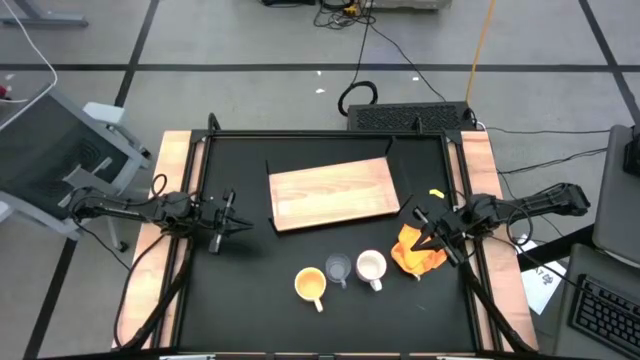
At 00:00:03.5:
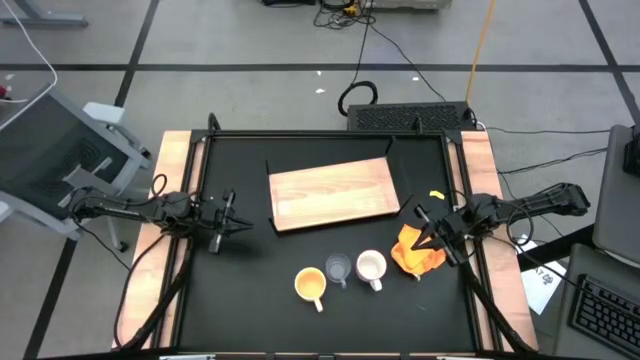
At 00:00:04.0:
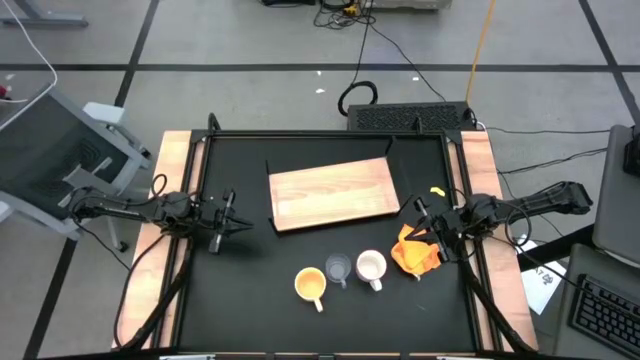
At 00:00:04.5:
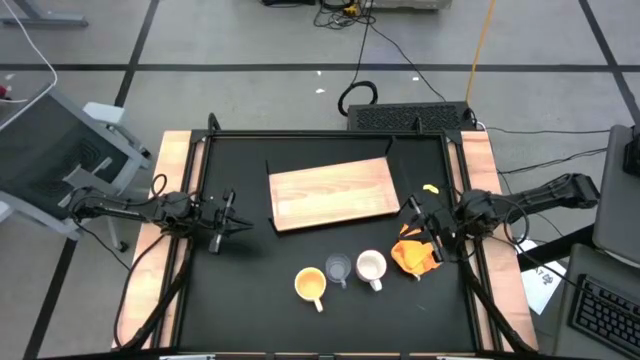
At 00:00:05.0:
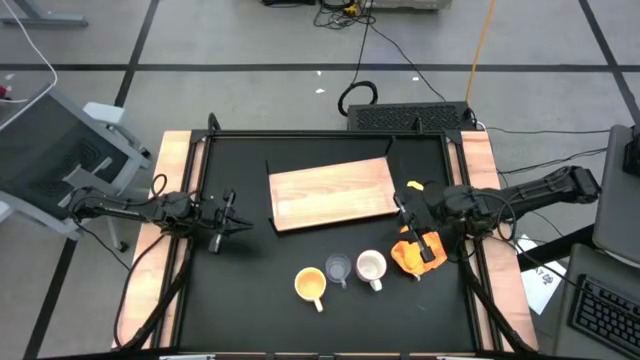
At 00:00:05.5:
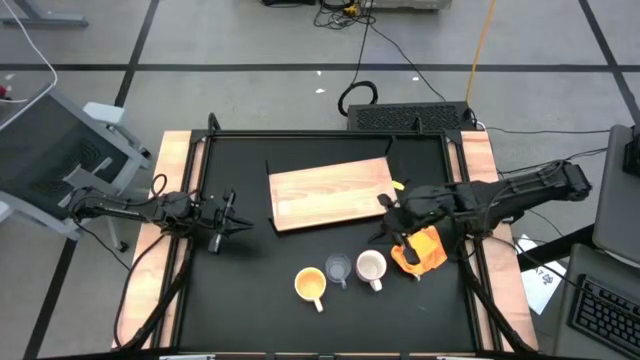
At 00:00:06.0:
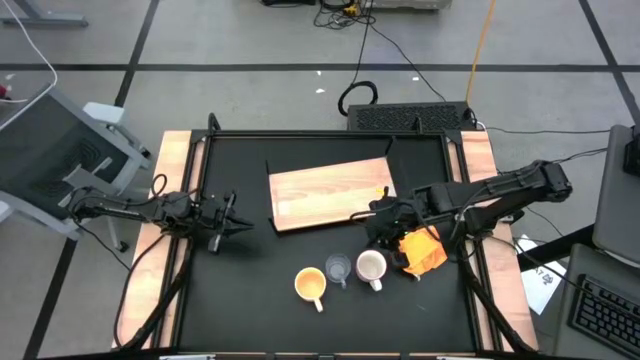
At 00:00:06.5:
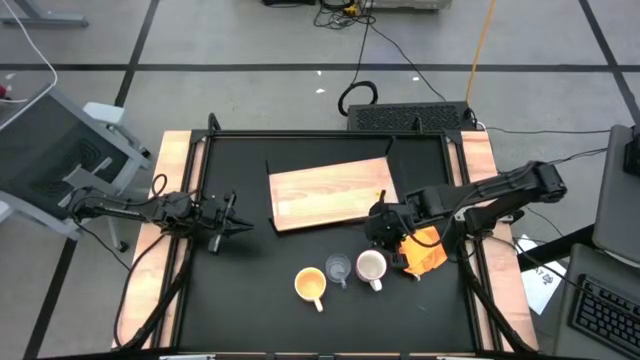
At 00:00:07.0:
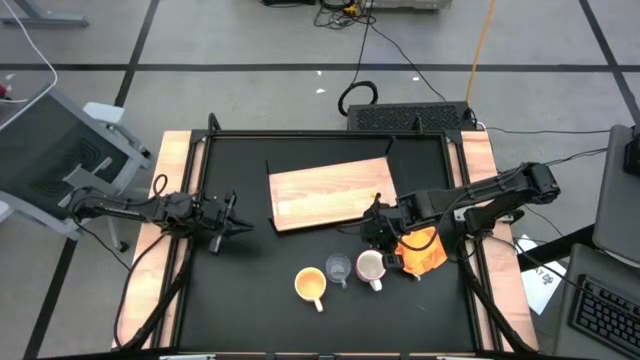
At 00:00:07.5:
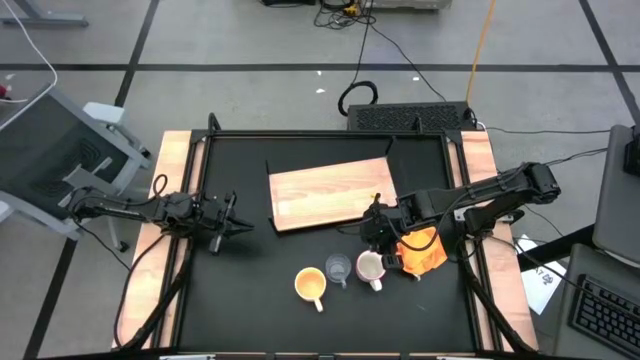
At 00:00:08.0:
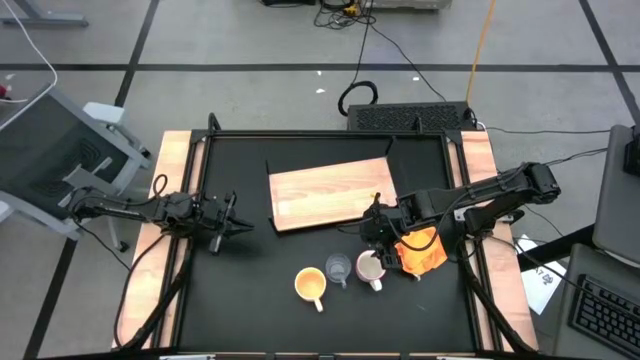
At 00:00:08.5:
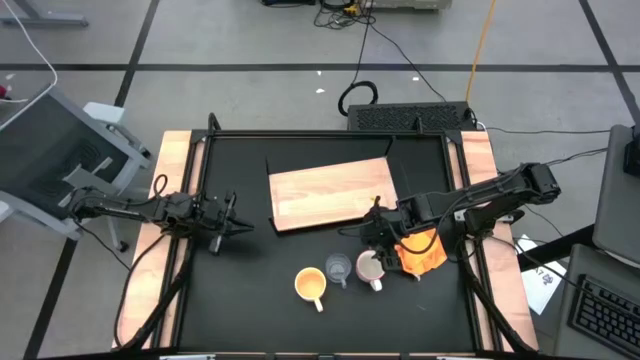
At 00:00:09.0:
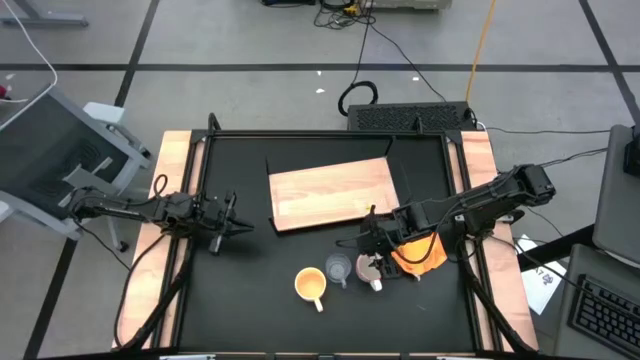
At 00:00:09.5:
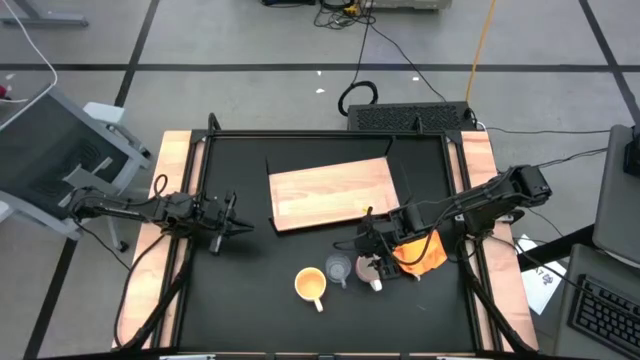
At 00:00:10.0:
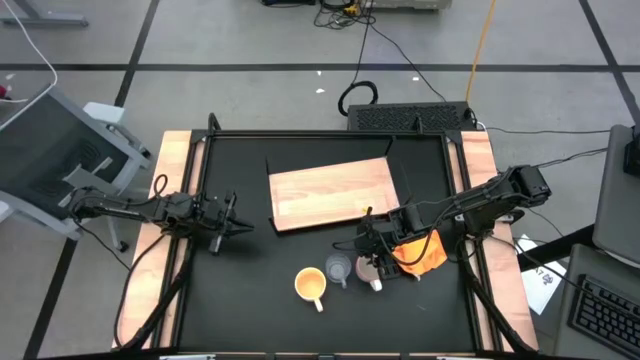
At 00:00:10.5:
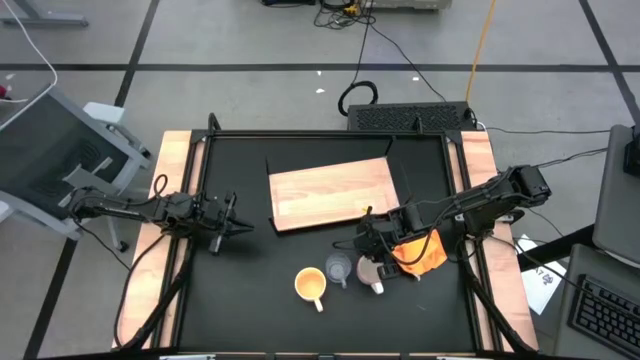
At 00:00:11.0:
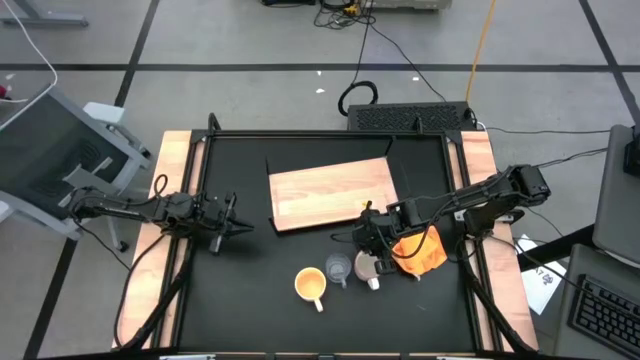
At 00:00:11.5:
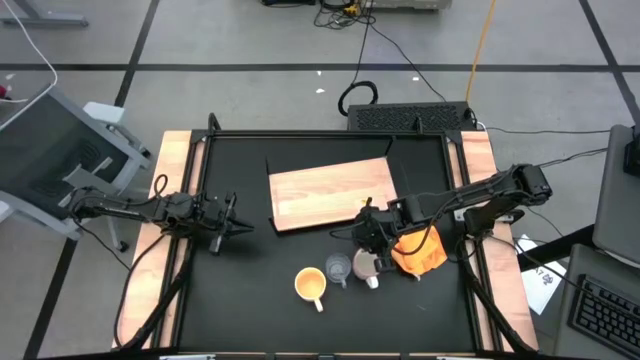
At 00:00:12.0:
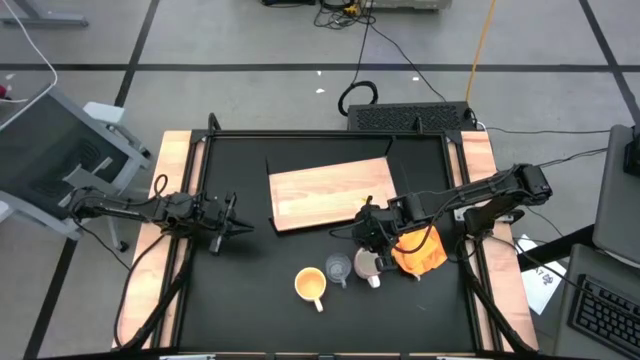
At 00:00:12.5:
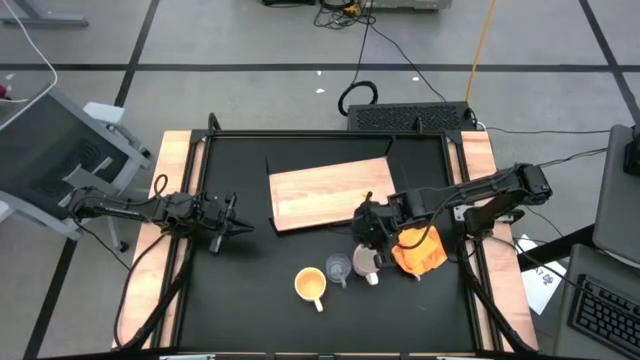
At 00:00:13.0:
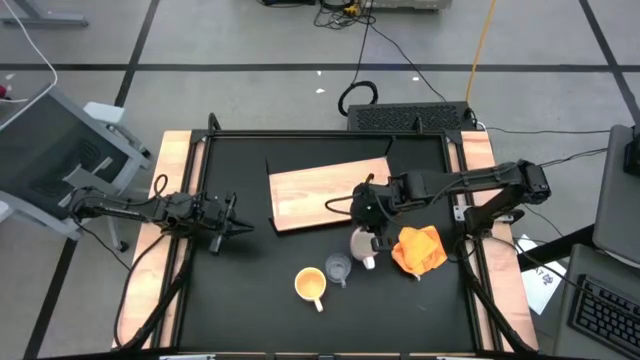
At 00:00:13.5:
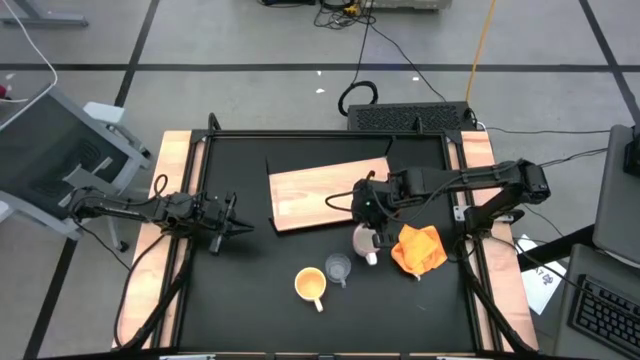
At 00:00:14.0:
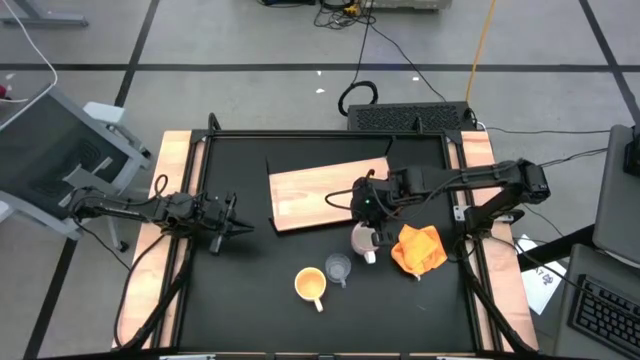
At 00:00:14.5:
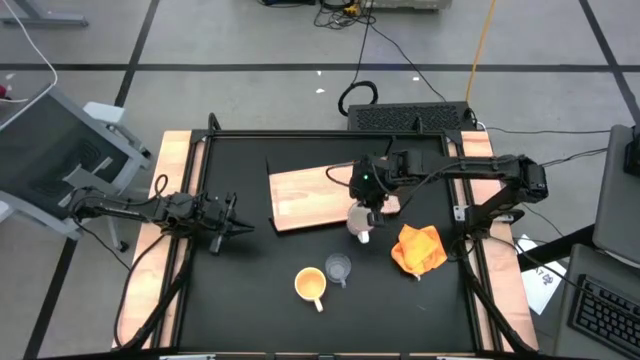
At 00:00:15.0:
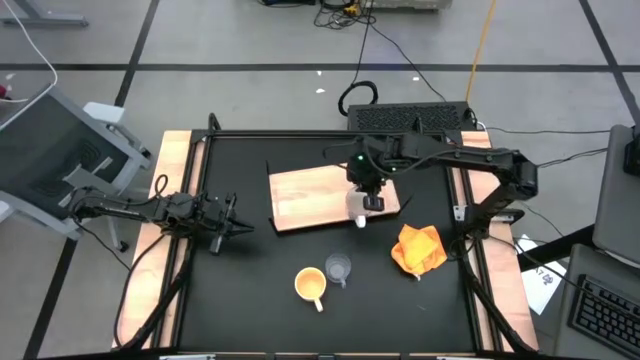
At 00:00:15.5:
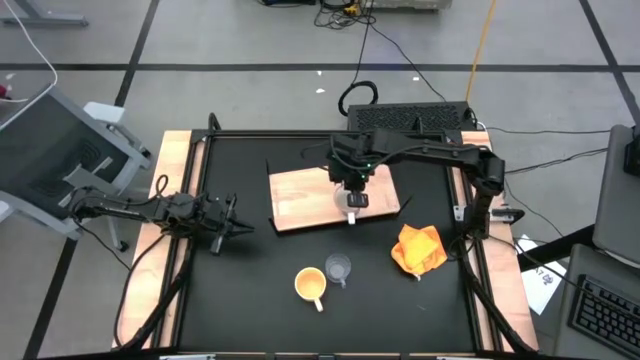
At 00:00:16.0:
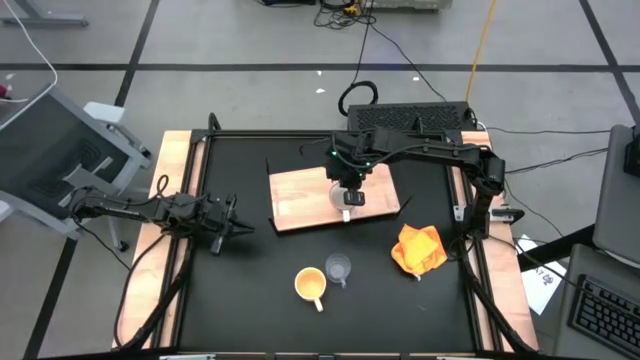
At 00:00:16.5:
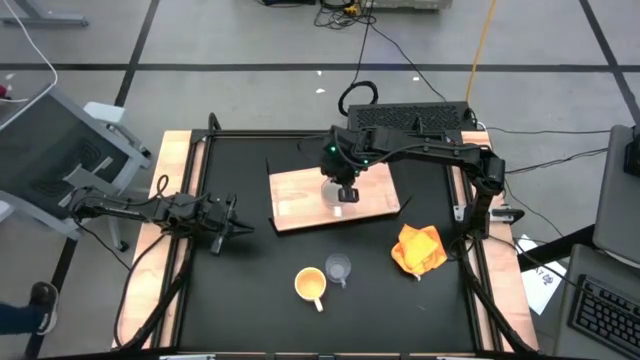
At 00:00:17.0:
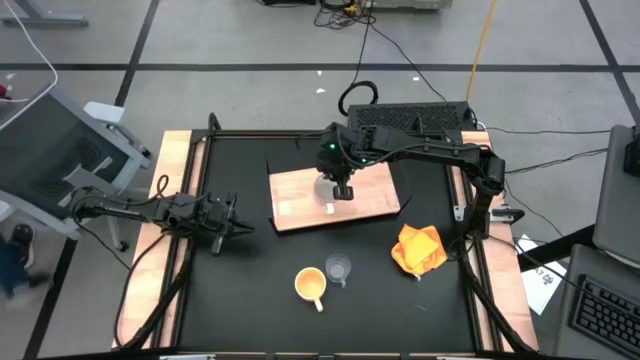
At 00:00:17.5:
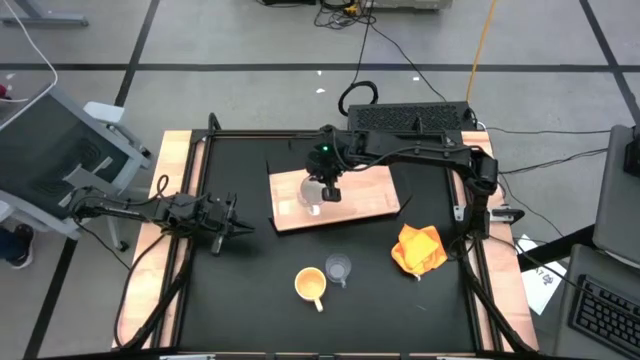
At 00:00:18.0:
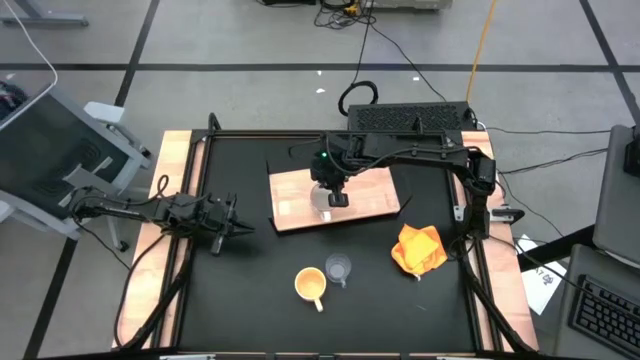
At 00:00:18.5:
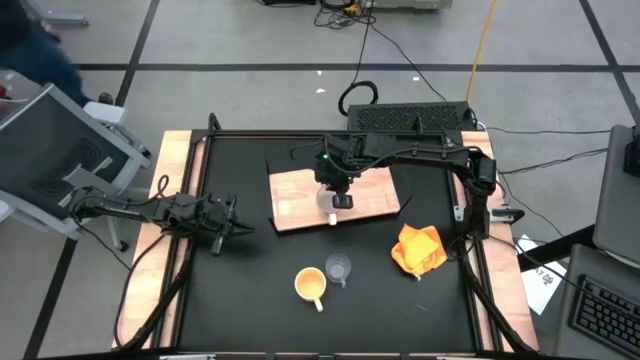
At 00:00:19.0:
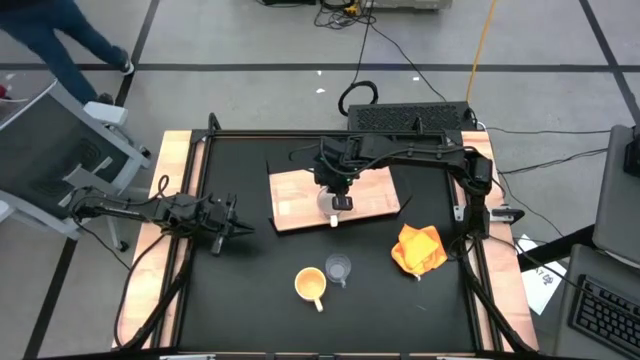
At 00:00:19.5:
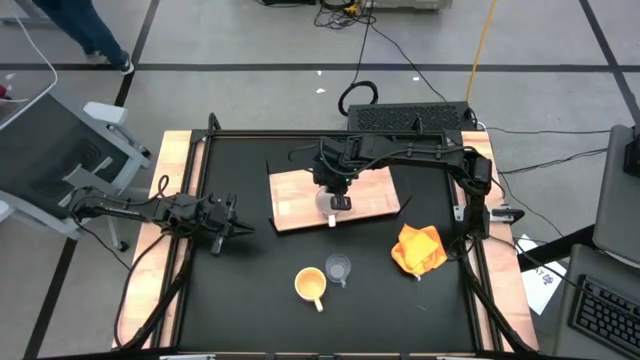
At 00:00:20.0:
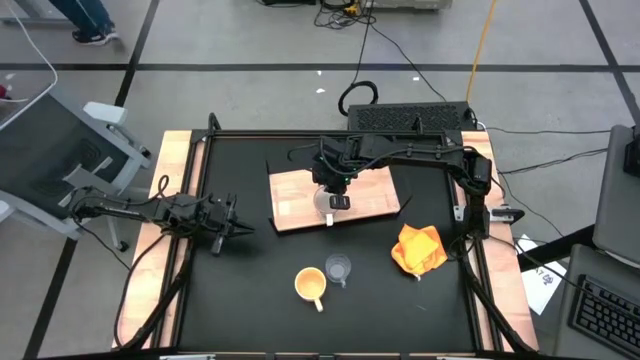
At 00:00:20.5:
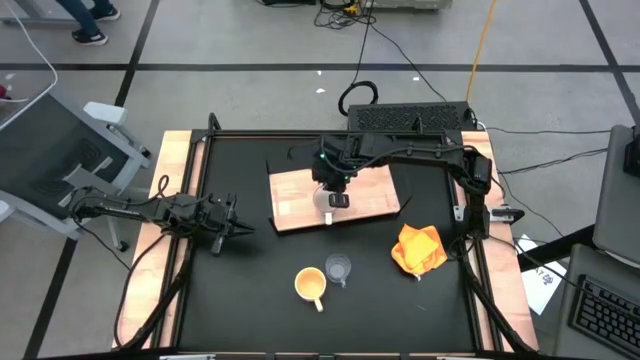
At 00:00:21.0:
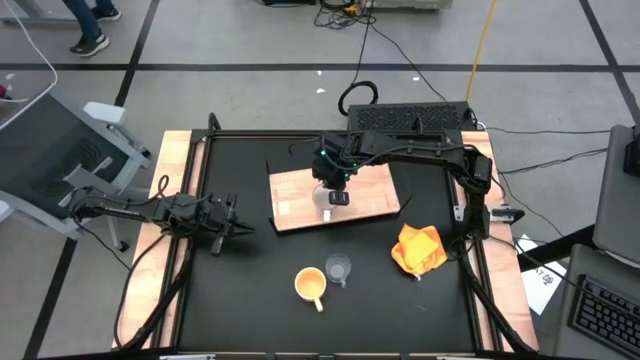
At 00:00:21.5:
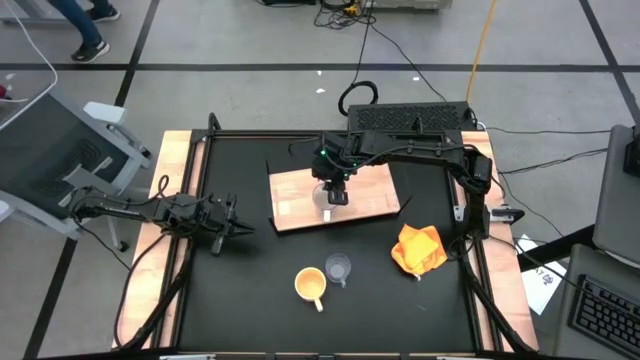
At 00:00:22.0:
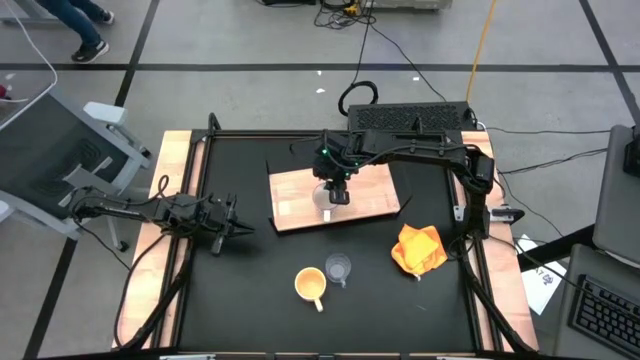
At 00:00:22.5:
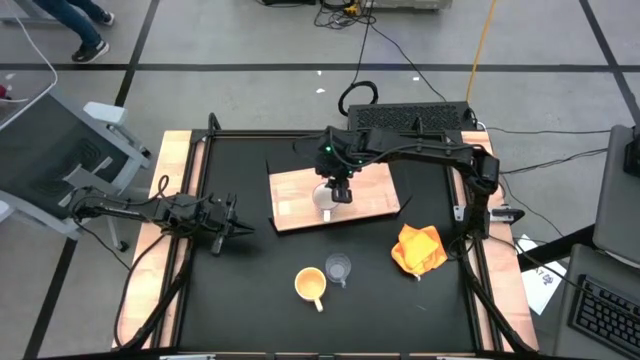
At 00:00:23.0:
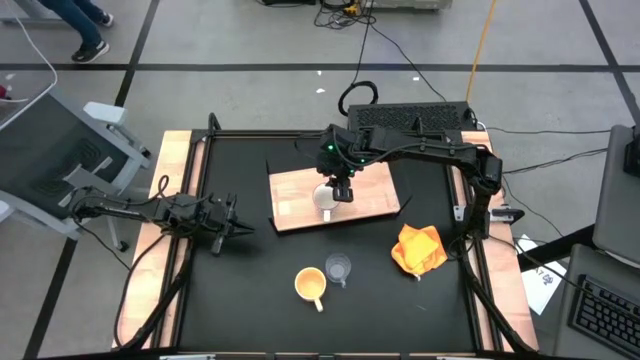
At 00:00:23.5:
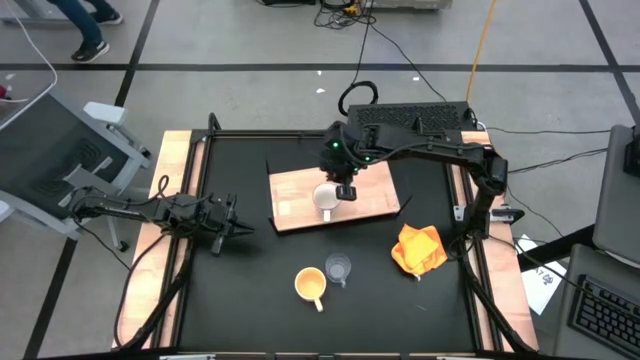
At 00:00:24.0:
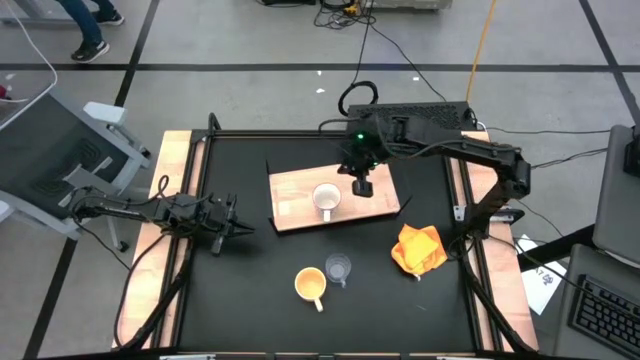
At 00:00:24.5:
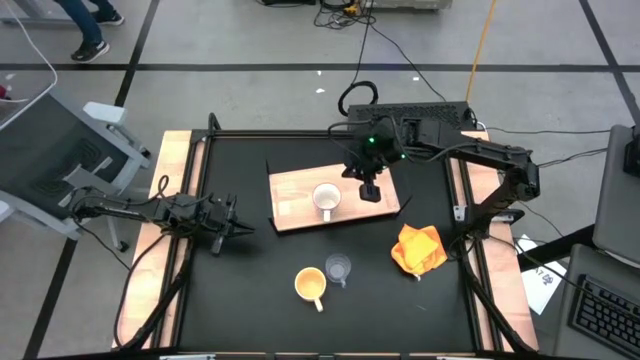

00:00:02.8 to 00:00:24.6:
Task: Stack small to large cups/mugs on shelf
Put the gray patterned mug on the shelf
